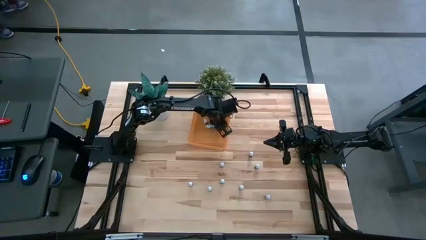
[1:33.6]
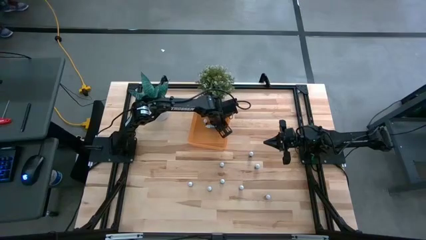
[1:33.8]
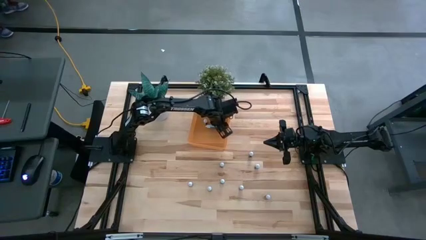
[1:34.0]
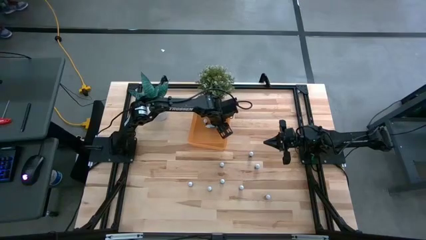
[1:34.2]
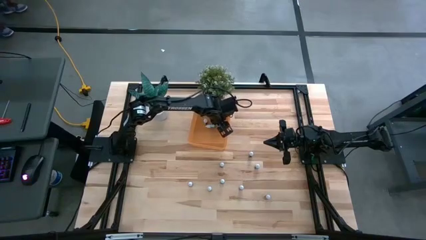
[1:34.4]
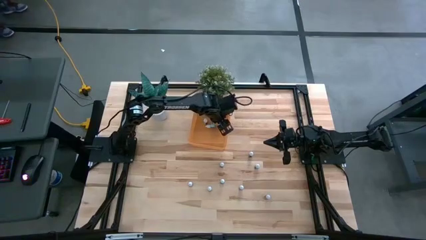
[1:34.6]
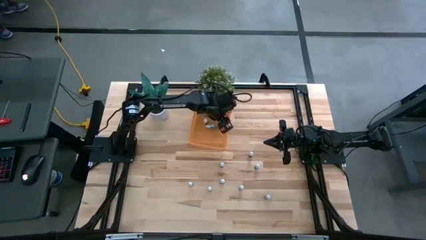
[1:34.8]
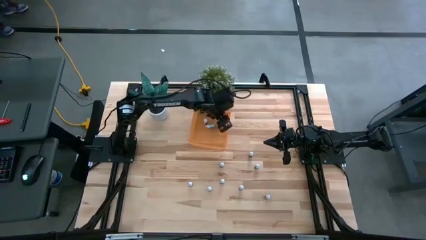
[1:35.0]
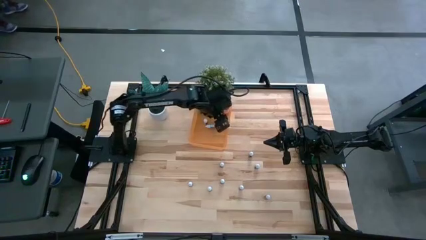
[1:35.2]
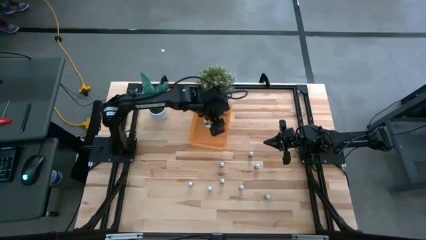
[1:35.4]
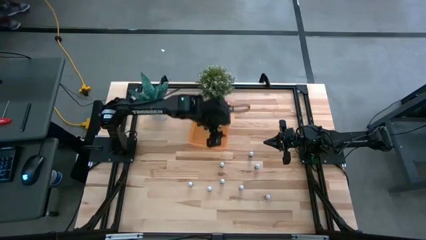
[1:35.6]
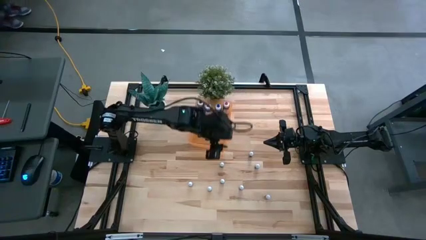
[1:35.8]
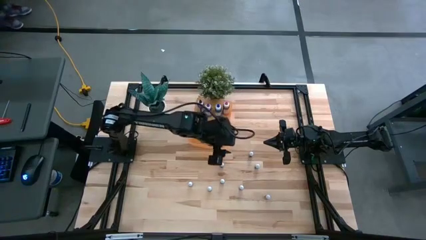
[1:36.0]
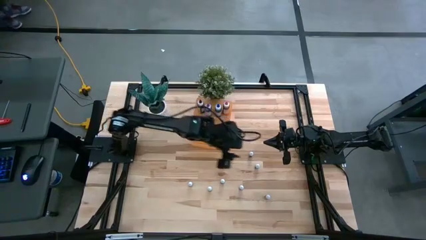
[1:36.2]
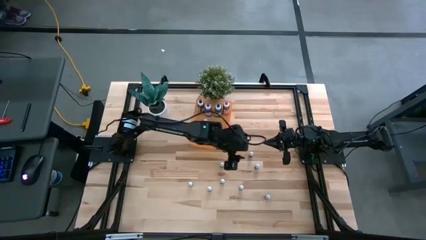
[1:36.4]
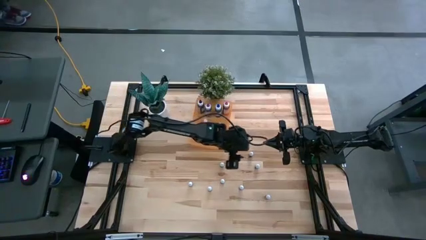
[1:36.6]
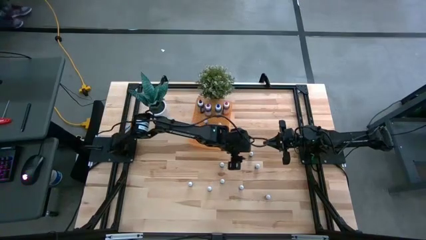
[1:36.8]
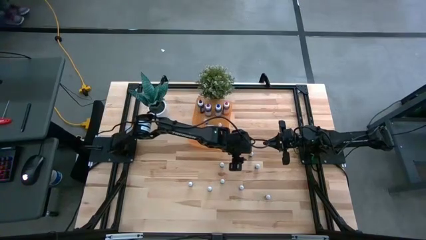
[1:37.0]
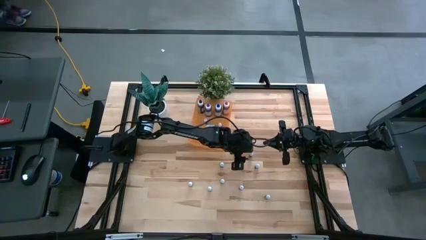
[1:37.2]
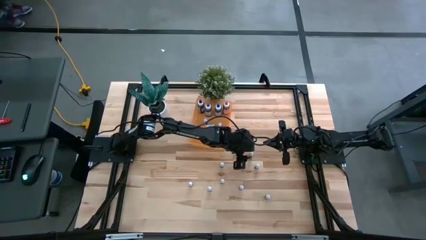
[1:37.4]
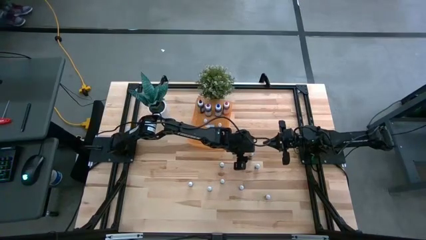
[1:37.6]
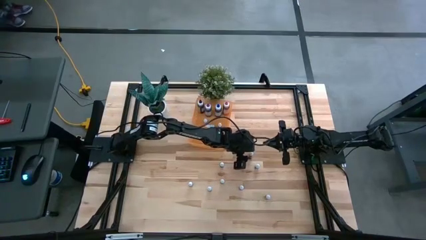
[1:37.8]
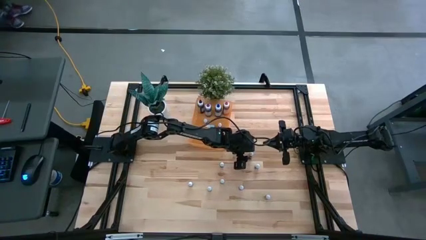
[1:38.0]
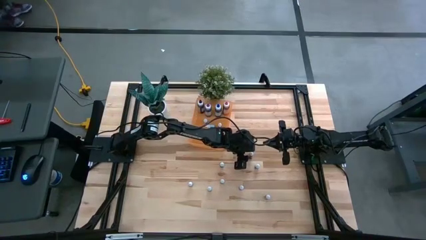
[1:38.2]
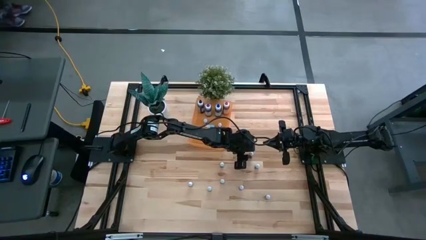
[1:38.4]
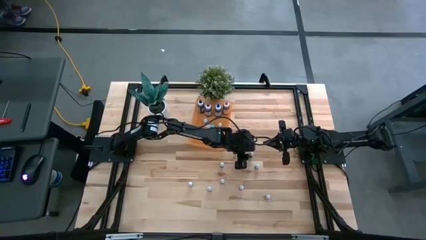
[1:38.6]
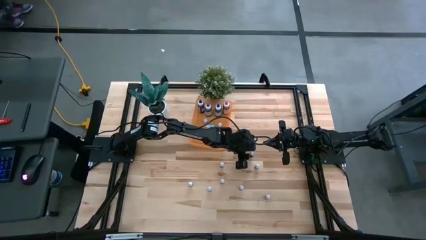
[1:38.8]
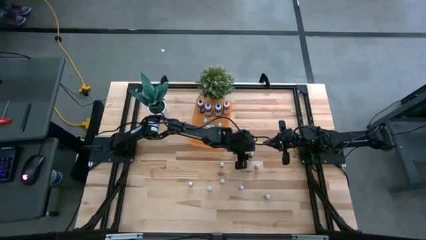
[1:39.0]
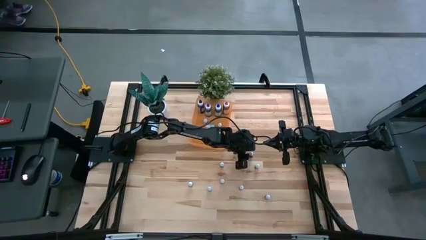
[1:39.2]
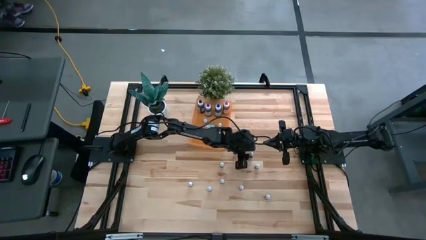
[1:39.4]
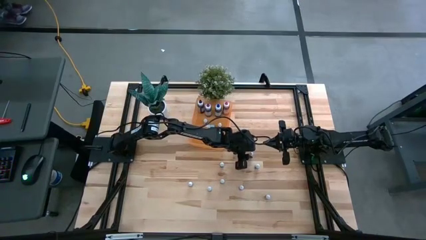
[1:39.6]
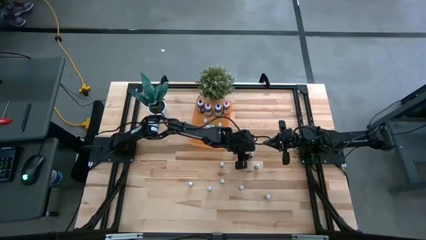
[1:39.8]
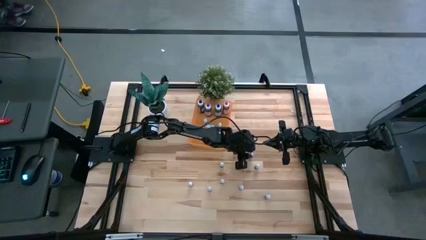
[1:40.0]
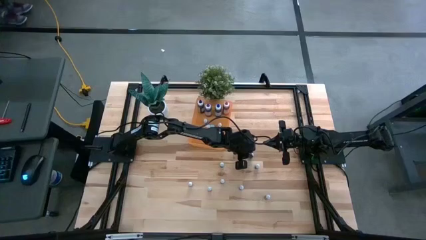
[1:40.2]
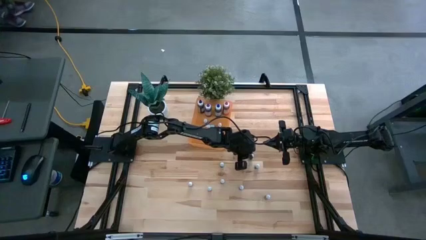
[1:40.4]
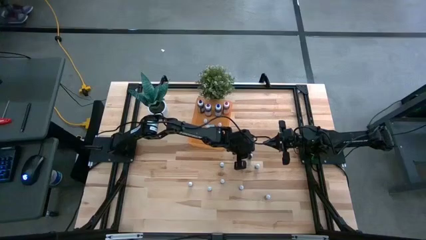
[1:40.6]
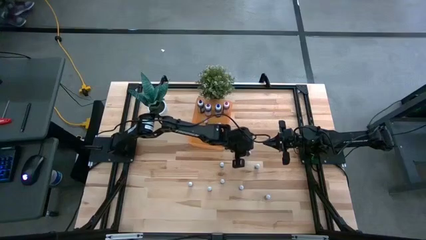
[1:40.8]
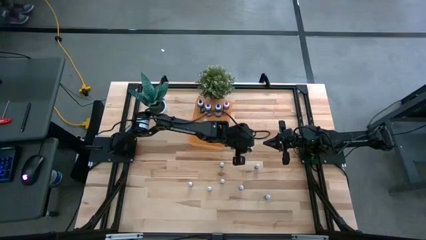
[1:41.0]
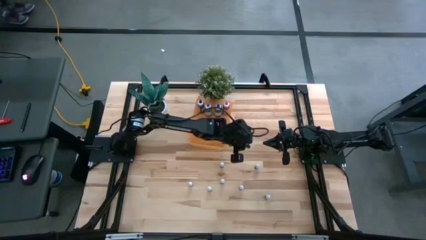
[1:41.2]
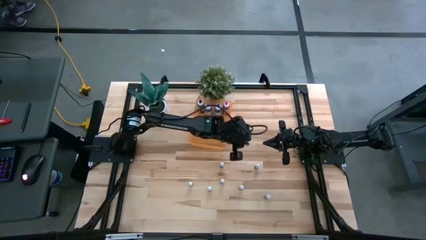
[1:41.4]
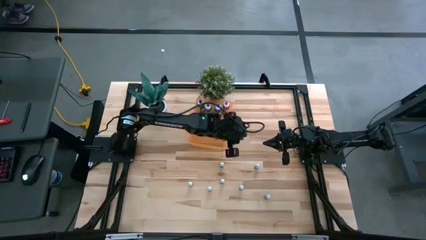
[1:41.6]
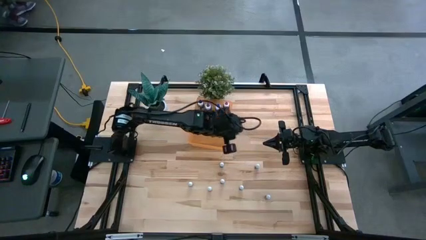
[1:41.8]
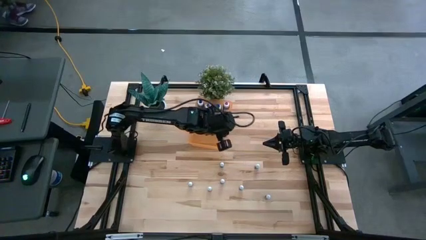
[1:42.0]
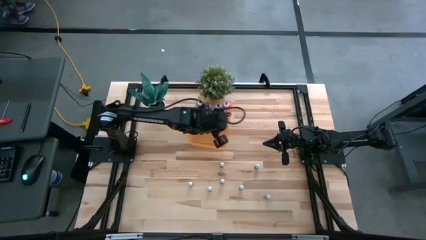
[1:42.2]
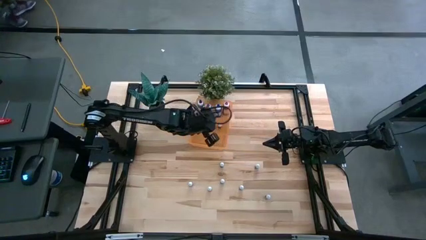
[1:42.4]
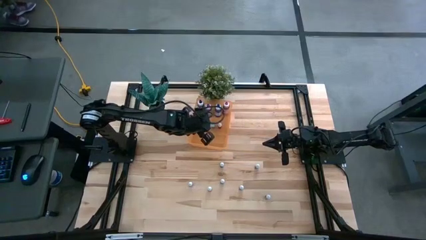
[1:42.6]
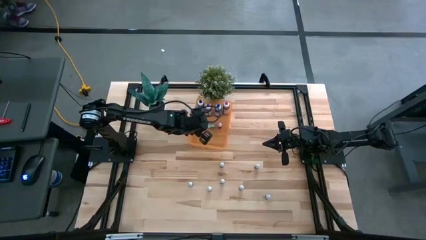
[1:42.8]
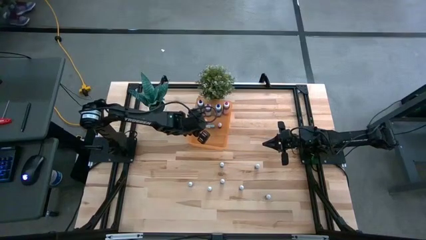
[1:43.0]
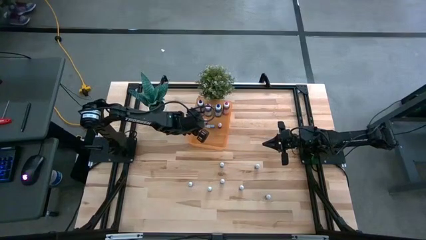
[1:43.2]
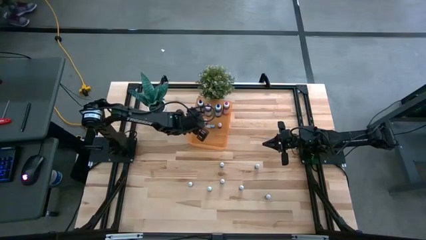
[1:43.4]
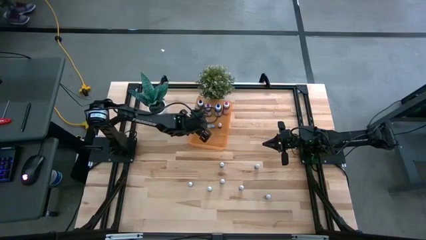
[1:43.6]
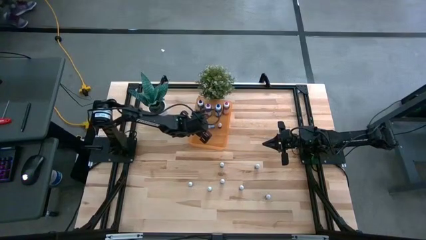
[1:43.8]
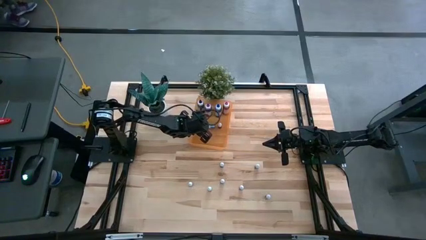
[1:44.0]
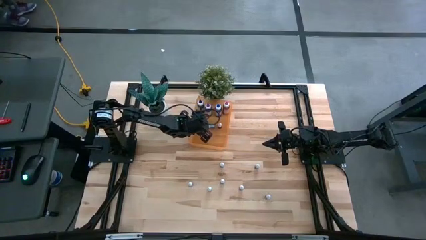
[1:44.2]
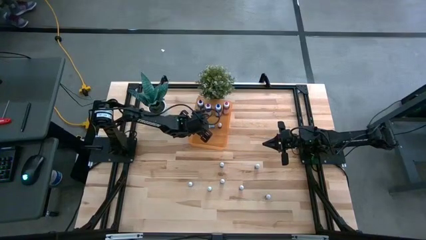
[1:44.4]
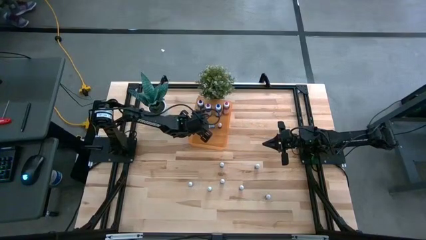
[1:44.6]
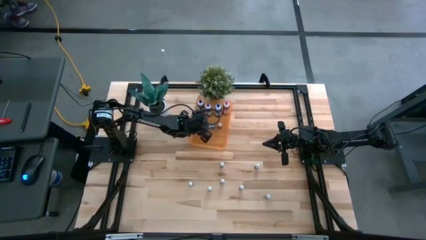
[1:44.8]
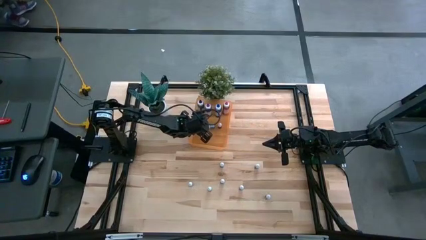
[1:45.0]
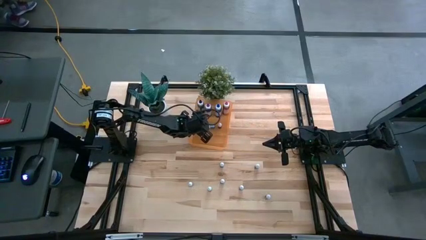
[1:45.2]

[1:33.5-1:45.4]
Task: Pick & Place food coloring
Put the small violet food coloring bottle into the orange bin
